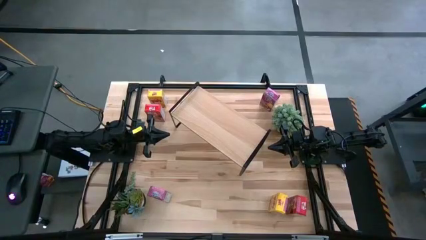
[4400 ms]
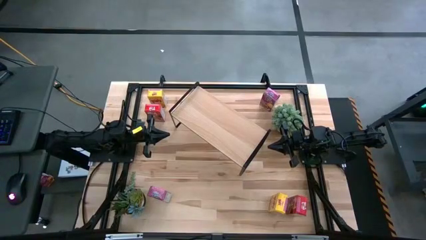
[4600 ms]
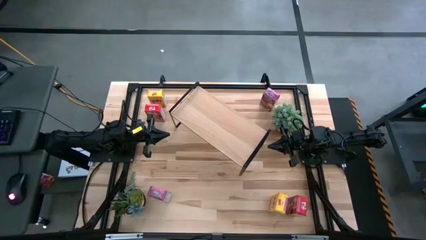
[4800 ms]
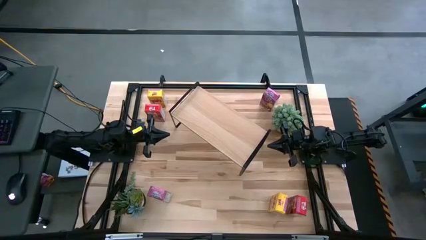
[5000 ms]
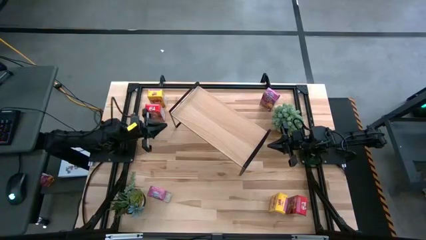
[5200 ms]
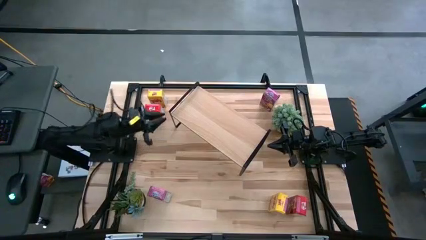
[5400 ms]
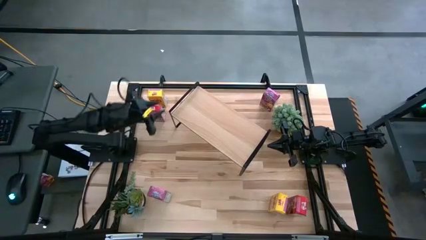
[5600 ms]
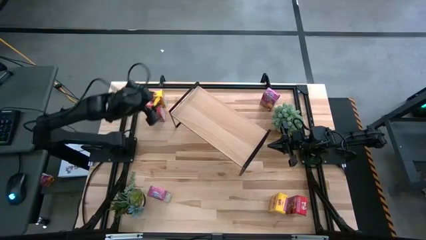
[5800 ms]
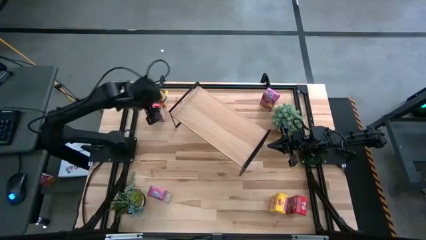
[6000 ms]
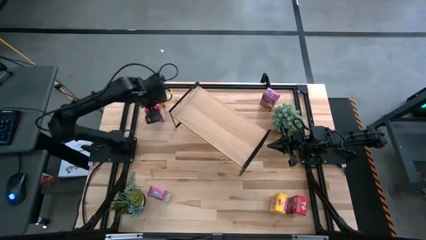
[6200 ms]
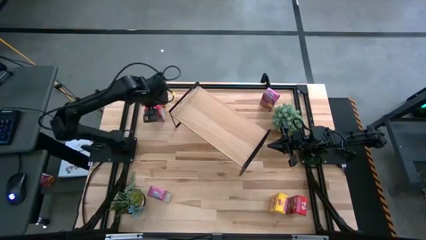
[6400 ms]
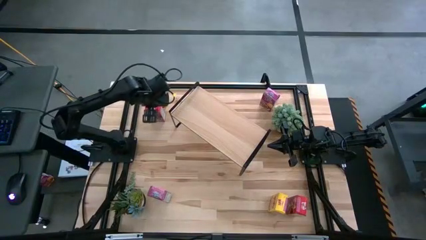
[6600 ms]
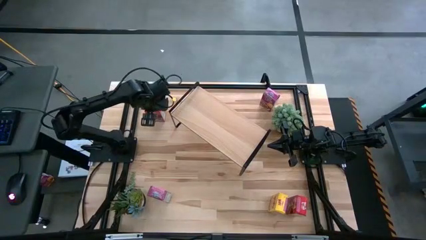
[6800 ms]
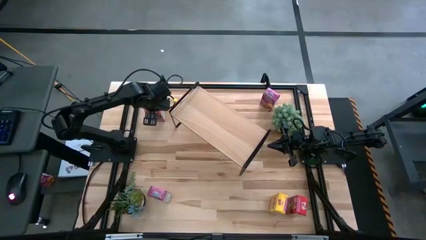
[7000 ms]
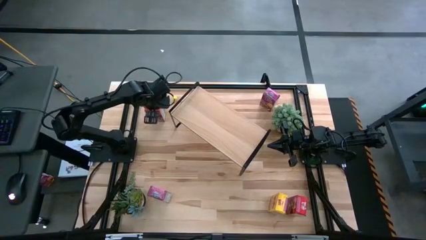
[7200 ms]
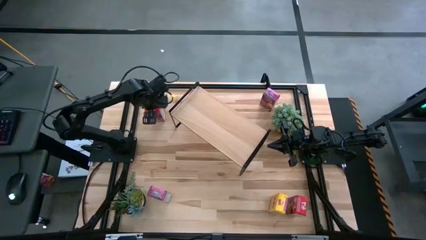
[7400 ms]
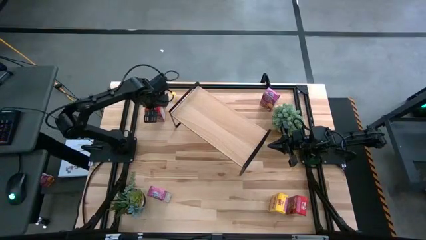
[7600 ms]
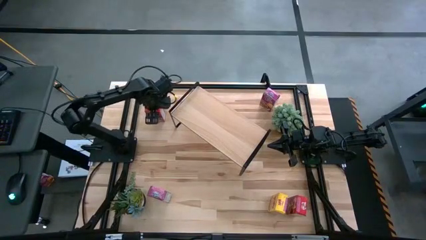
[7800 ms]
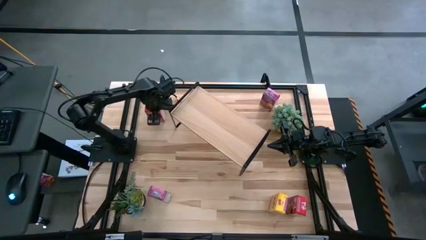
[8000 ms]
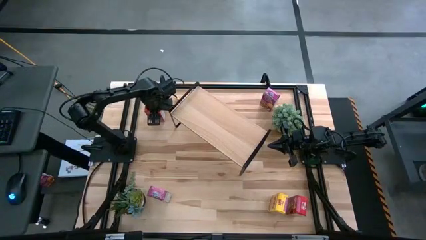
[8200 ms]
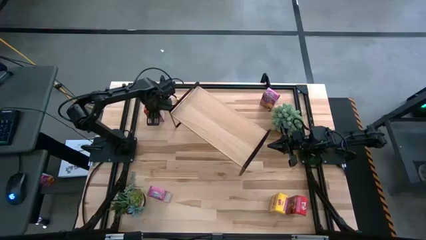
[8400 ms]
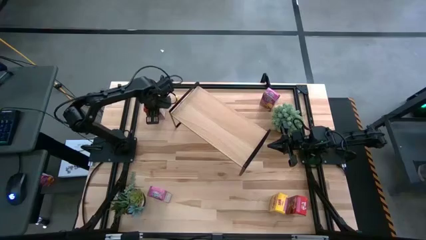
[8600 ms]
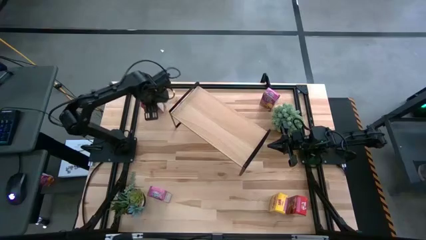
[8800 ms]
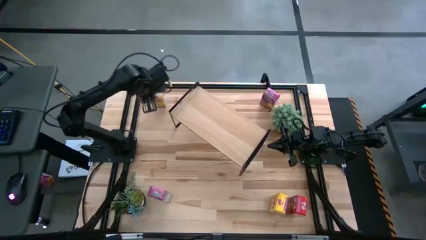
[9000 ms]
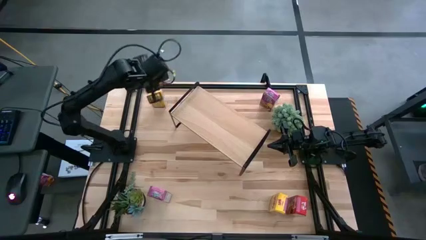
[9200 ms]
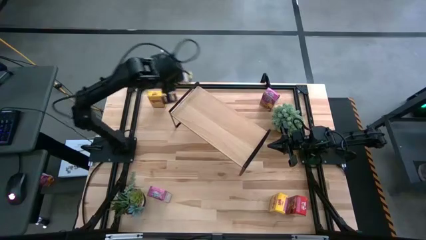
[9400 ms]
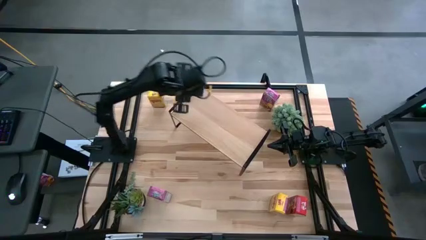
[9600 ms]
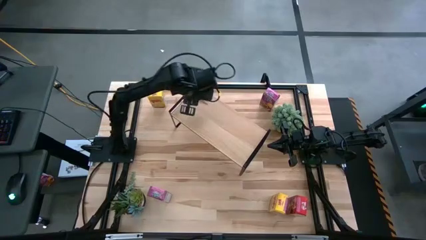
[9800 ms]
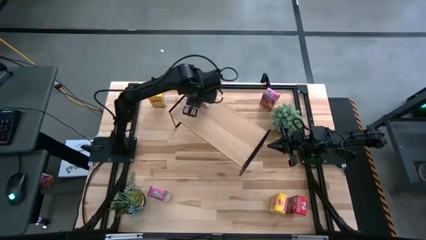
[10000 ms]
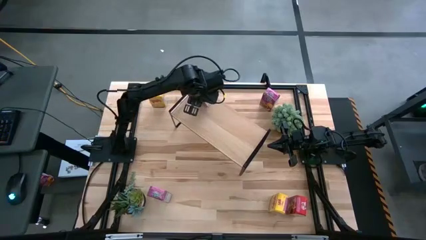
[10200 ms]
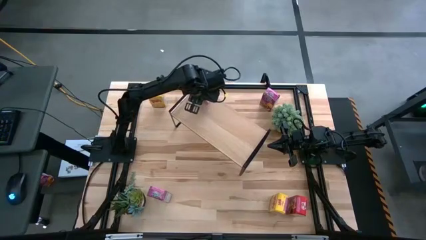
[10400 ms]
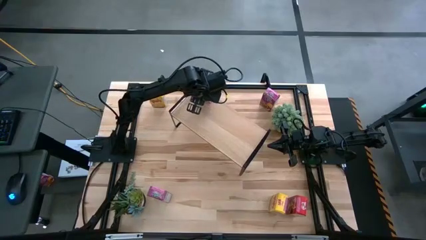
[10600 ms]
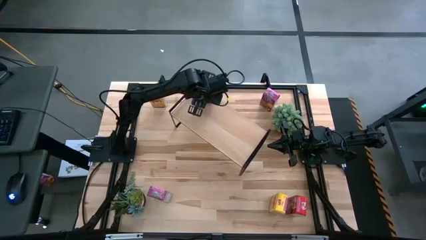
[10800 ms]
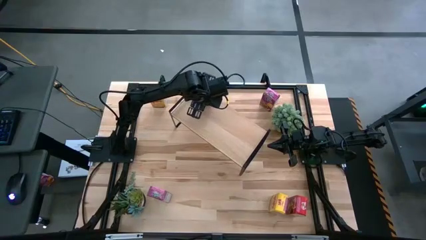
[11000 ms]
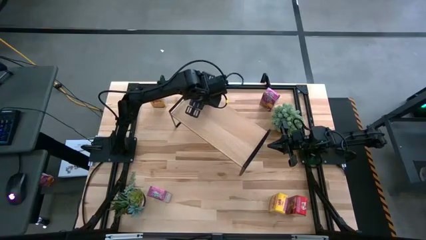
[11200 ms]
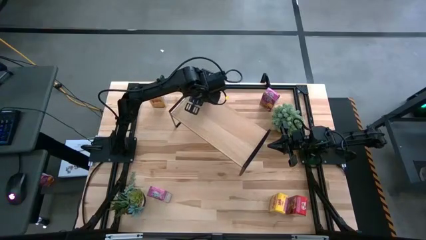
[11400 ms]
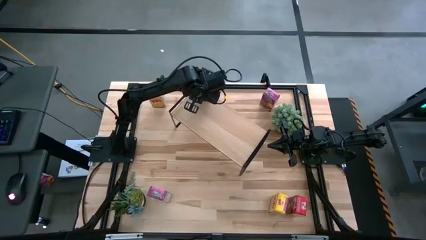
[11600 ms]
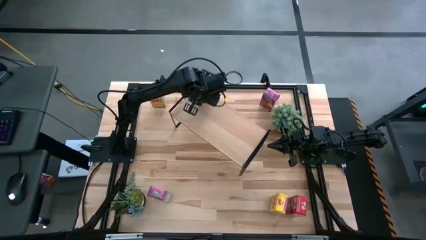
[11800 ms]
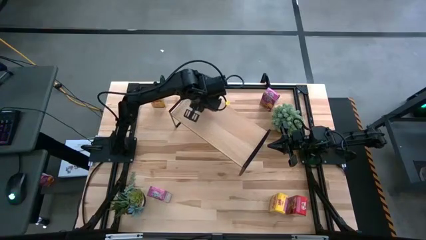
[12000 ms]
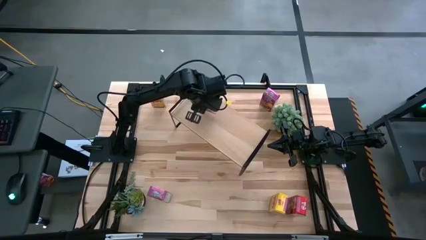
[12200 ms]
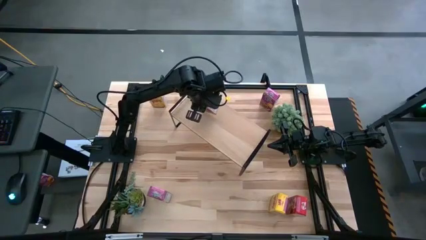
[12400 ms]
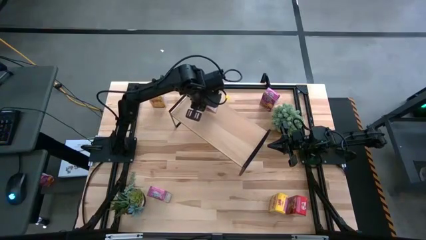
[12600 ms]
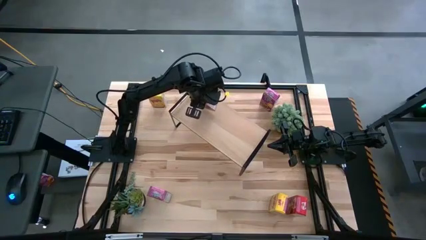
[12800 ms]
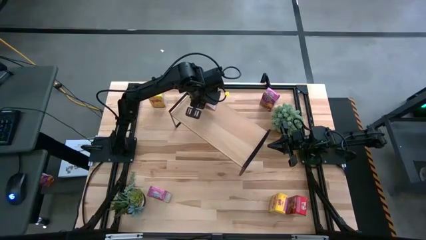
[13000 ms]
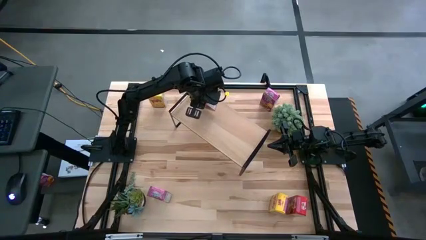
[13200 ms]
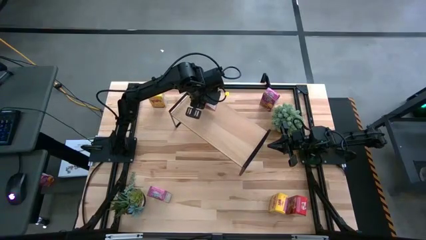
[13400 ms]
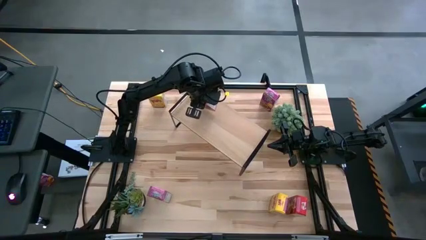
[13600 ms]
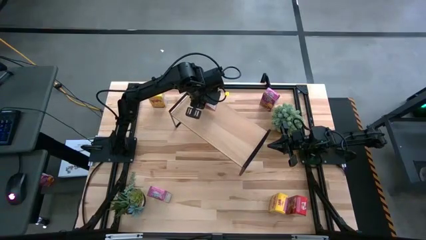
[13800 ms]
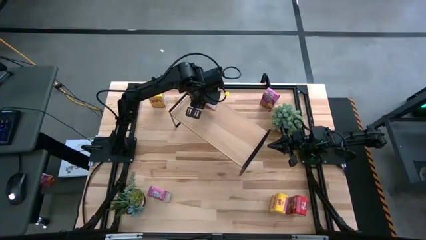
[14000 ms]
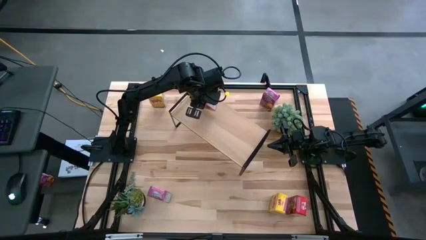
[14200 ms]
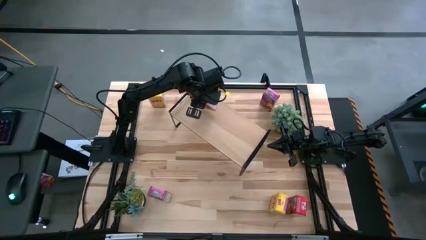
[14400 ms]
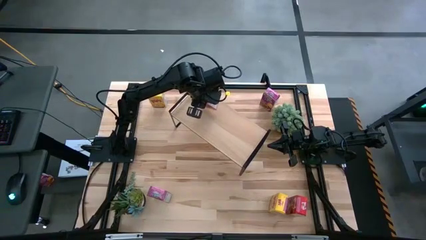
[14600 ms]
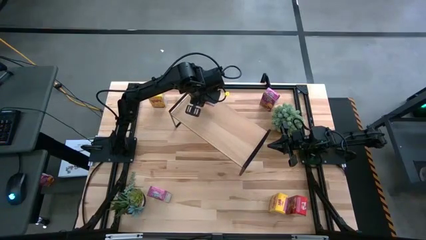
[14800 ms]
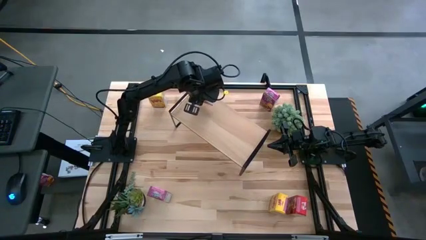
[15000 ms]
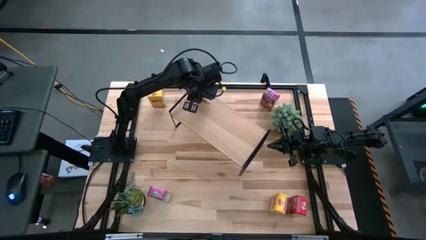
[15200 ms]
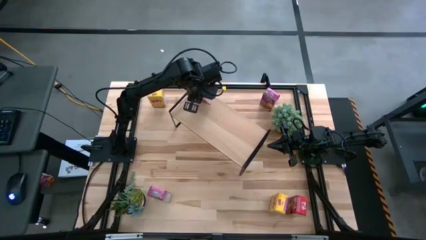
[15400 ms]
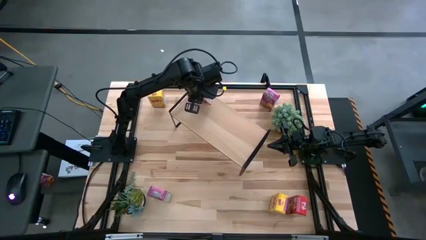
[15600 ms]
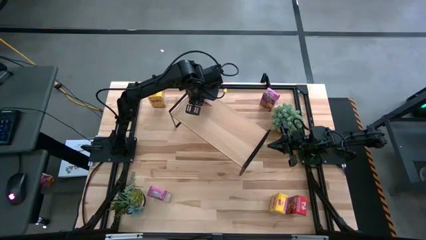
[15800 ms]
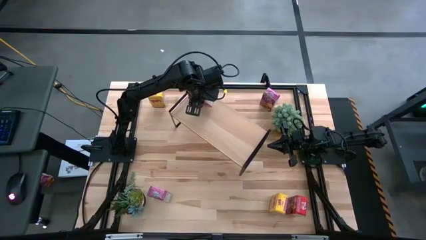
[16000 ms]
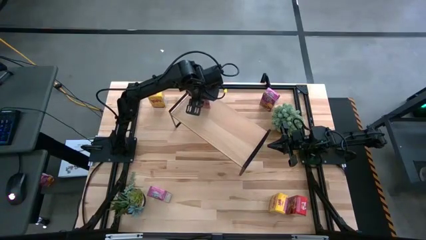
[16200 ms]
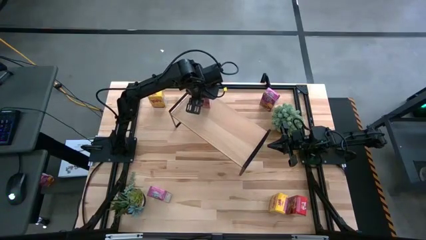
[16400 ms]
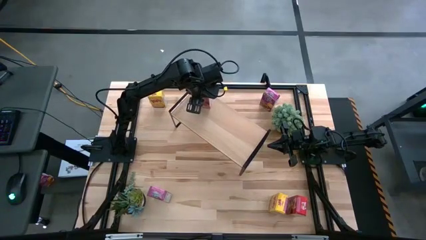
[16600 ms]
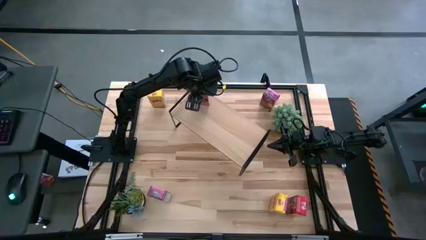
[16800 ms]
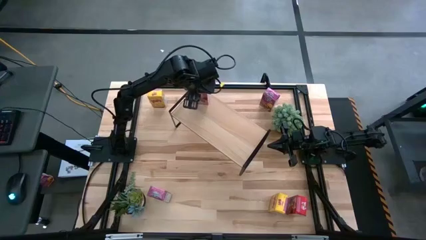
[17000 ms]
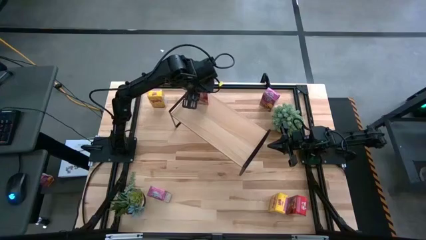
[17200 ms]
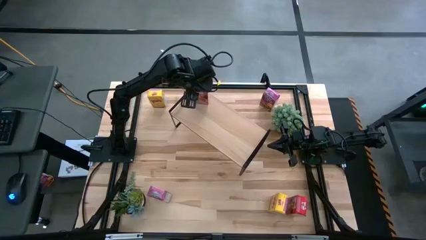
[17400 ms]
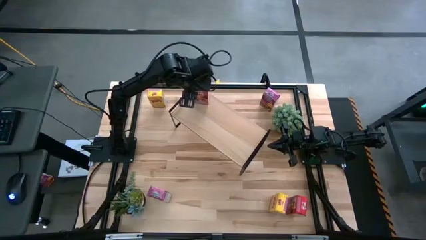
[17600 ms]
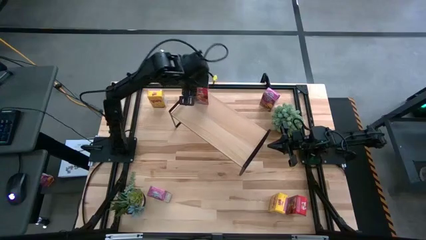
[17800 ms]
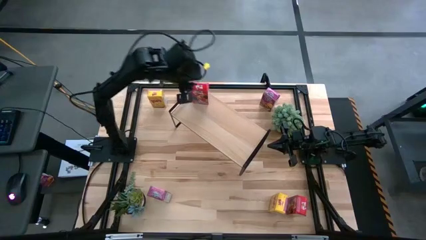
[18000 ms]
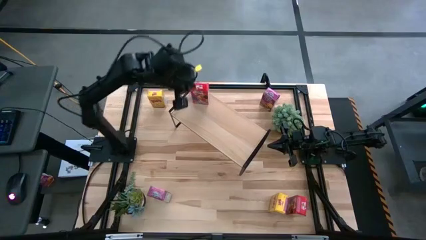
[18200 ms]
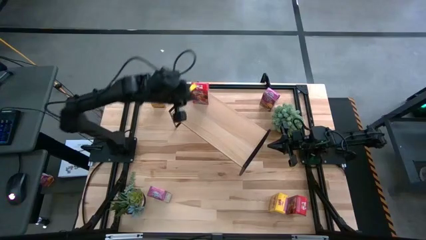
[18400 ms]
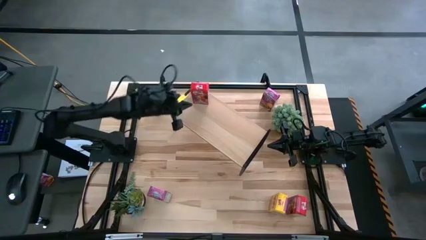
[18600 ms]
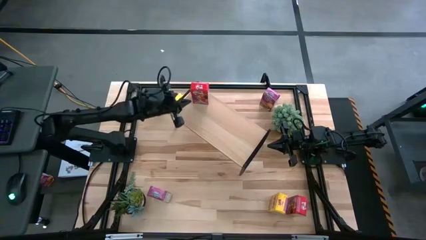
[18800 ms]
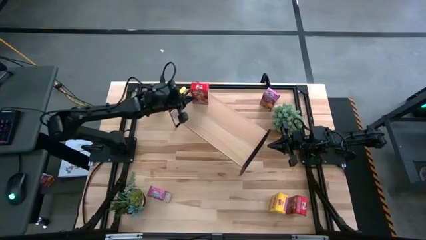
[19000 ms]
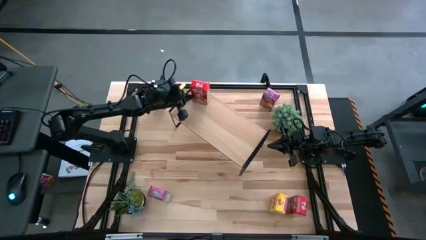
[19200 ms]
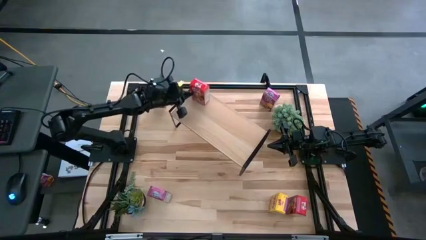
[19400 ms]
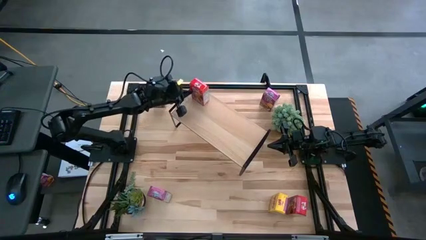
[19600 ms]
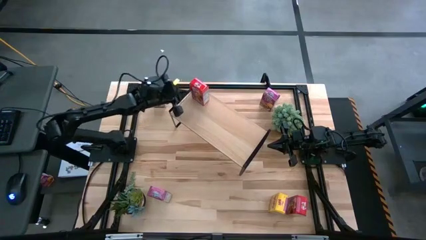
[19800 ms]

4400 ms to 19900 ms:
Task: Stack cereal on shelf
Put the top red cereal box on the shelf
